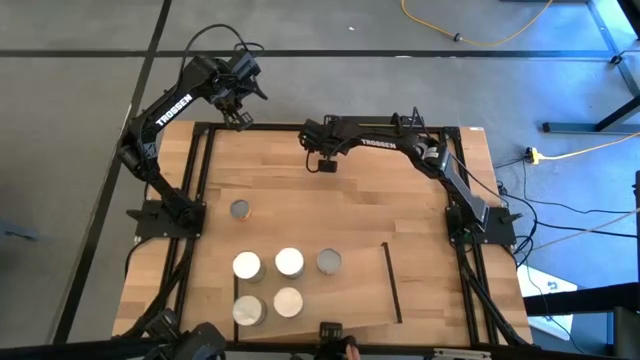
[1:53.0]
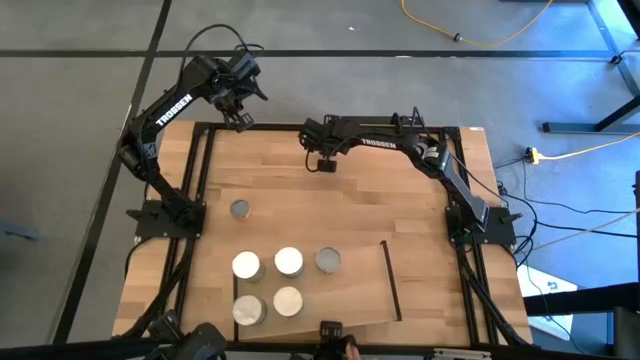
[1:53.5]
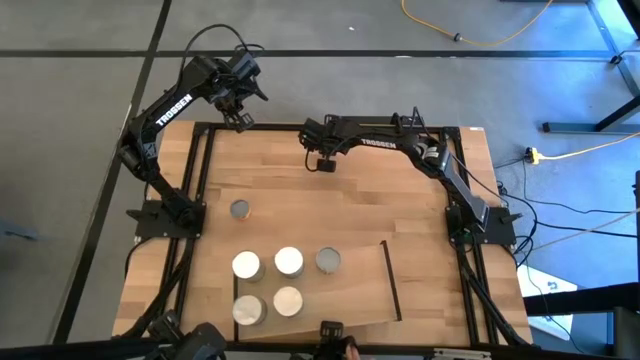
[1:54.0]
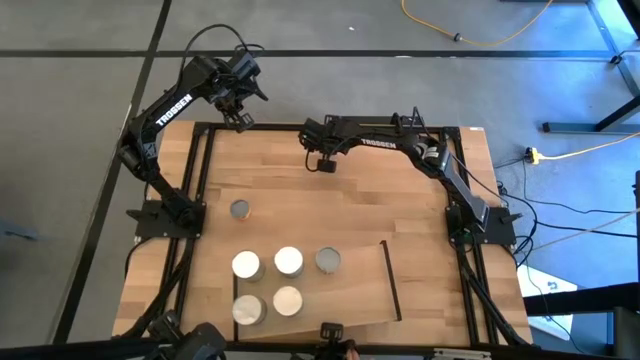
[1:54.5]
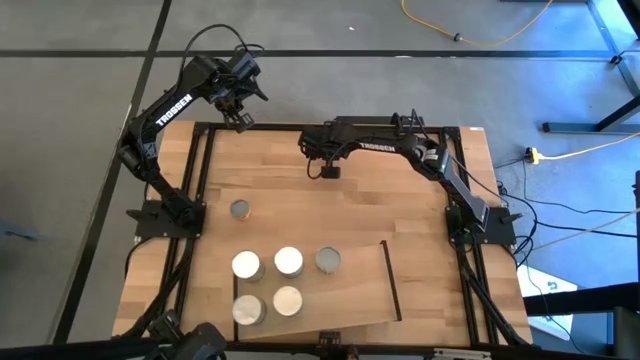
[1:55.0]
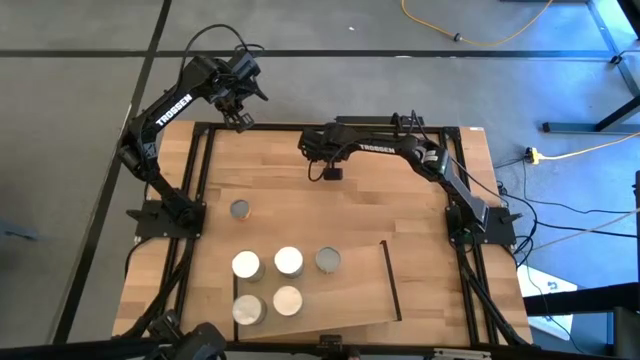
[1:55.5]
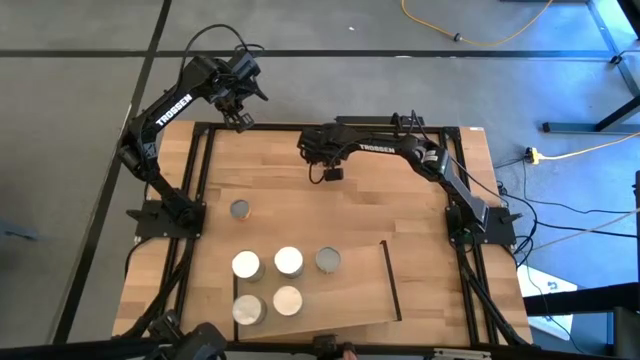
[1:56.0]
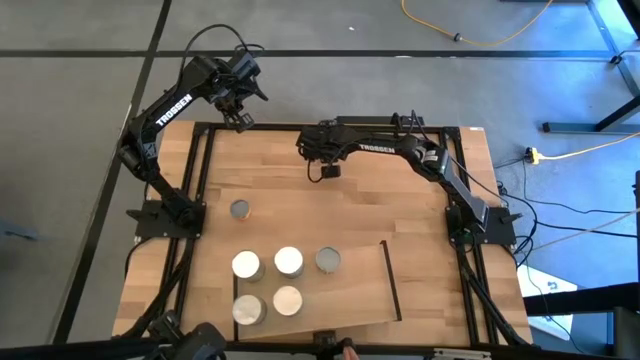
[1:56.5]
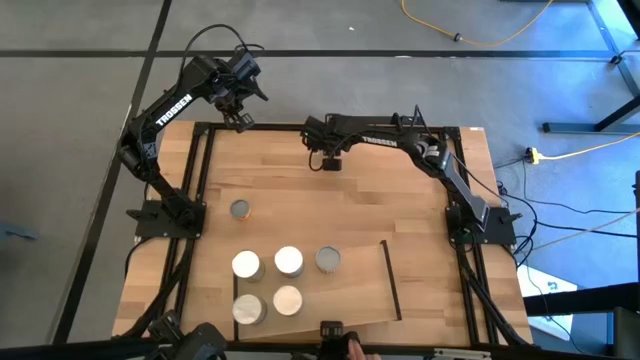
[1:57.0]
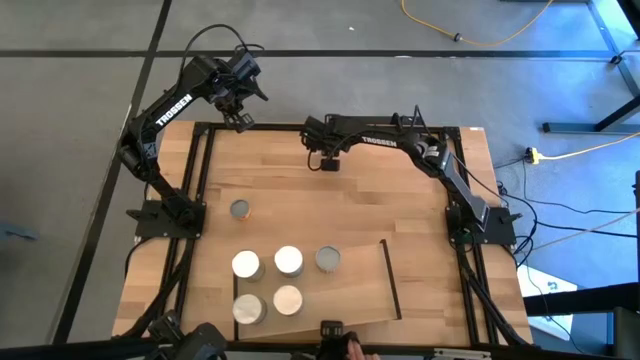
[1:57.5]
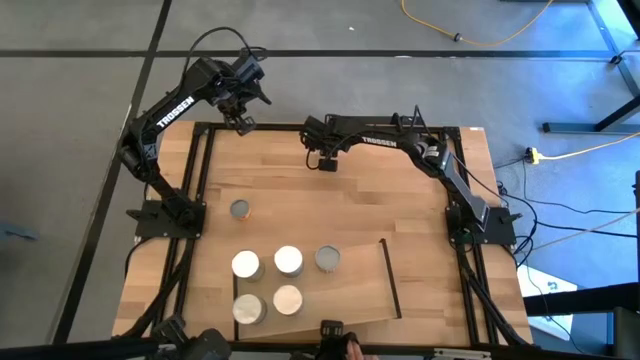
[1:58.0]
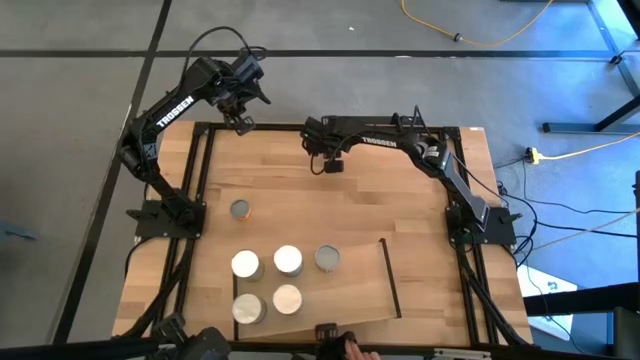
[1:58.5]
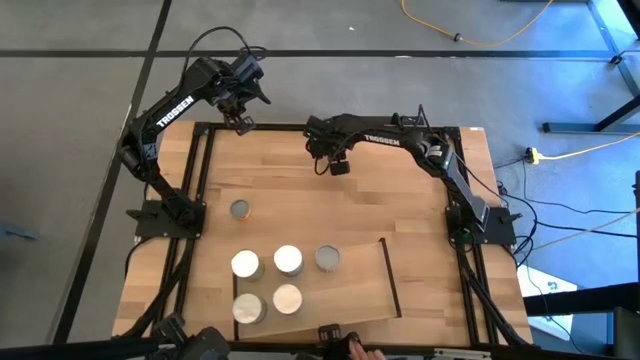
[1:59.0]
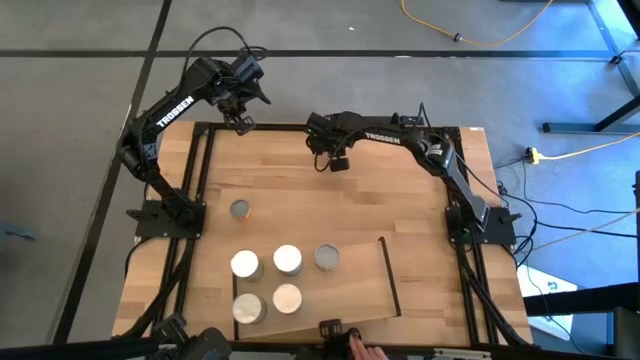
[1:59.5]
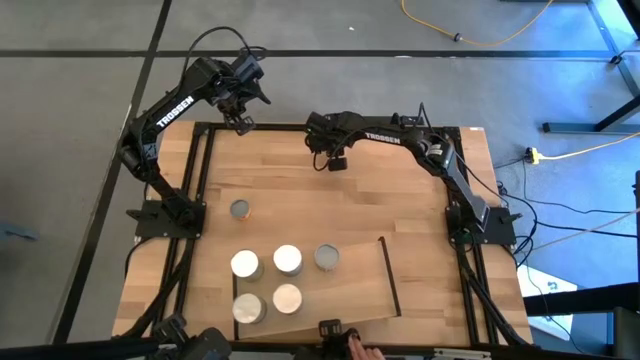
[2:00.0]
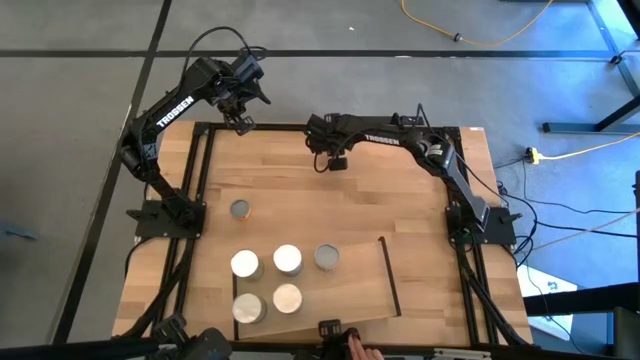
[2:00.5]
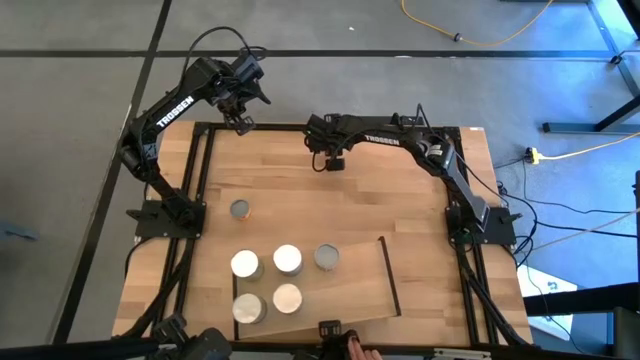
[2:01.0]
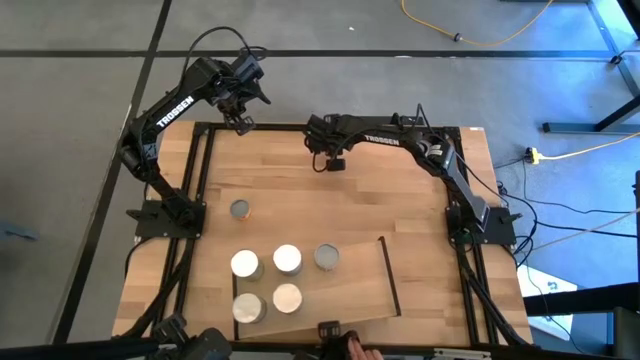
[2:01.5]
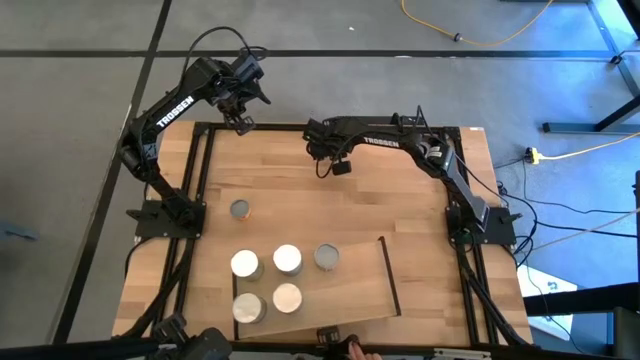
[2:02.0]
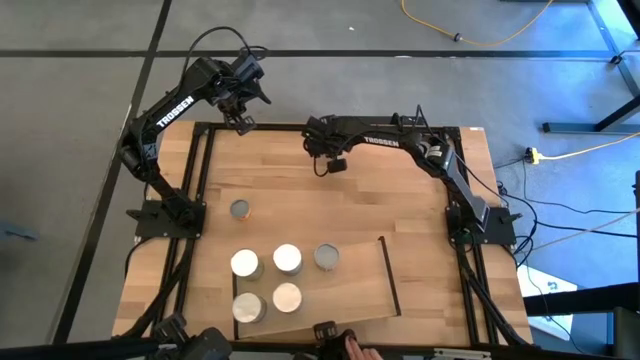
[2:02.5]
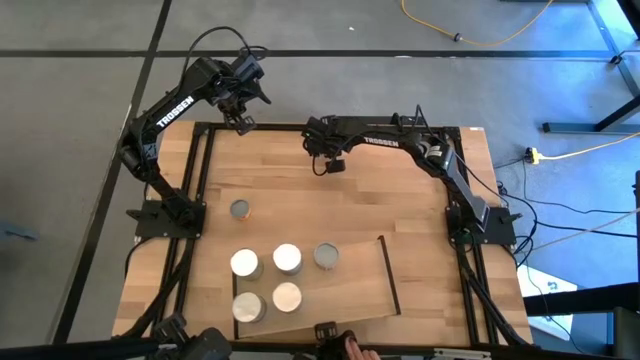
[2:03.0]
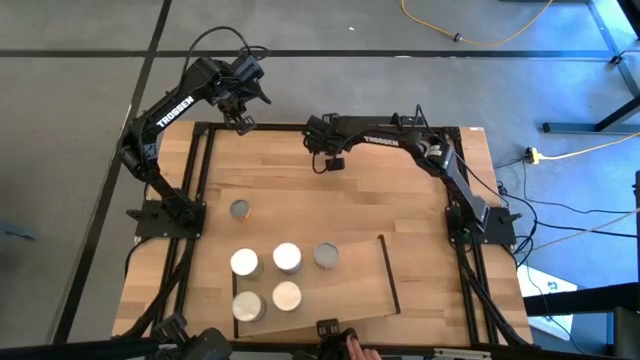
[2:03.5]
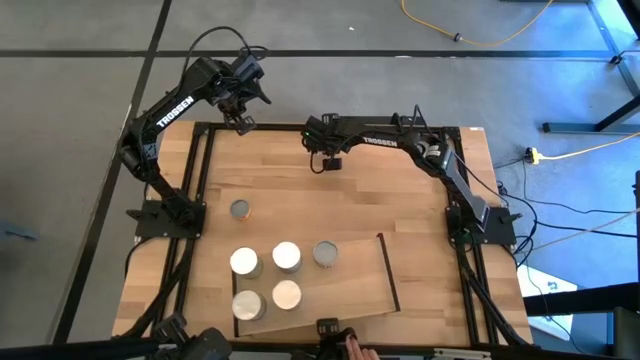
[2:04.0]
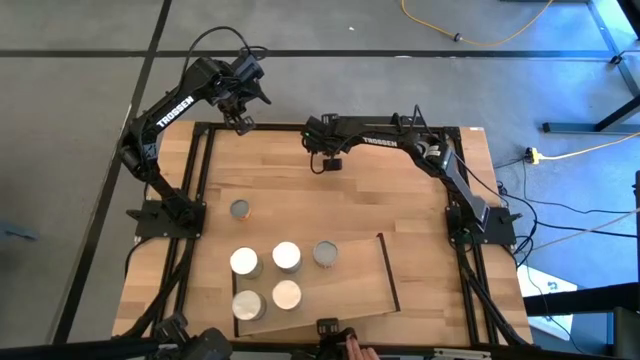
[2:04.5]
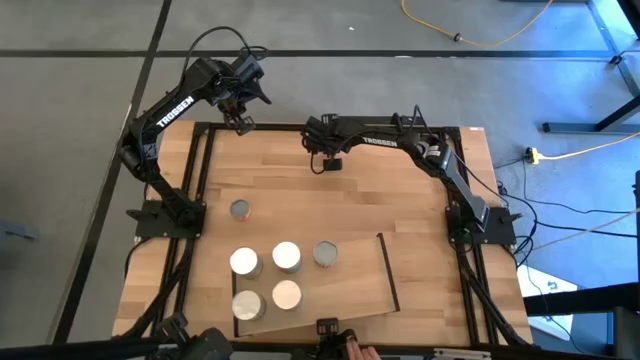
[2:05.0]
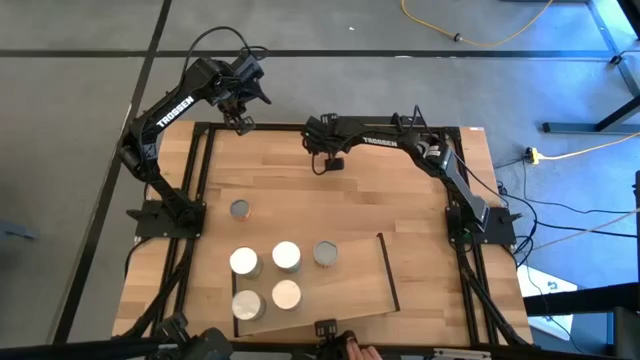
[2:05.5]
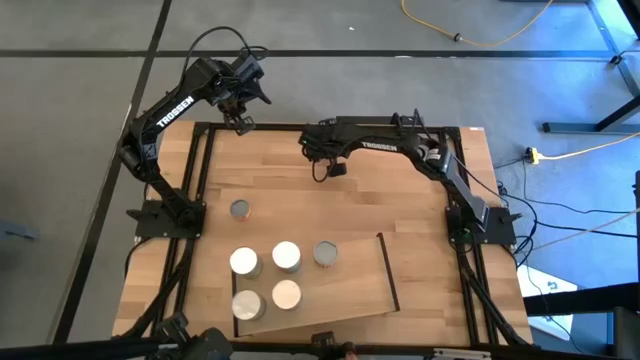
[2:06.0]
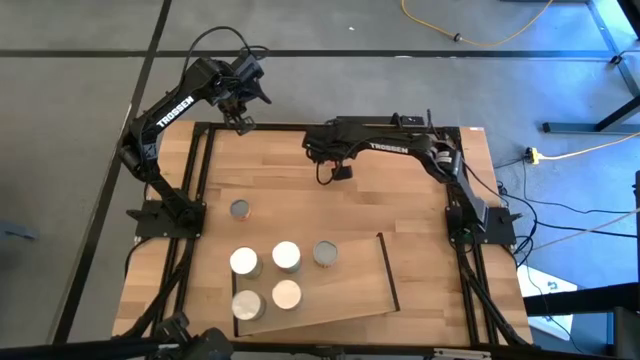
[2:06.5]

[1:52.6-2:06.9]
Task: Pick and place cans onto a shelf
Put the canned meat balls on the shelf

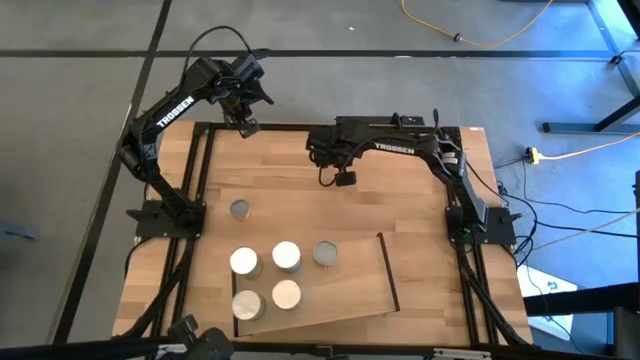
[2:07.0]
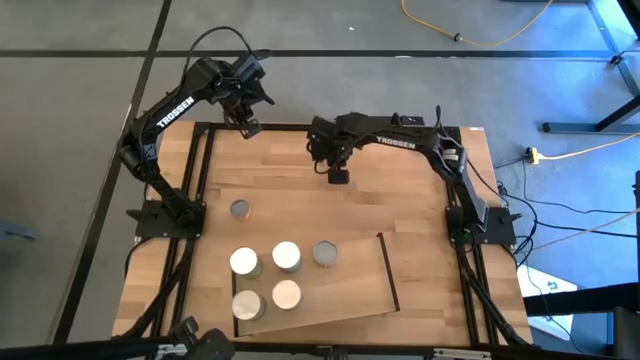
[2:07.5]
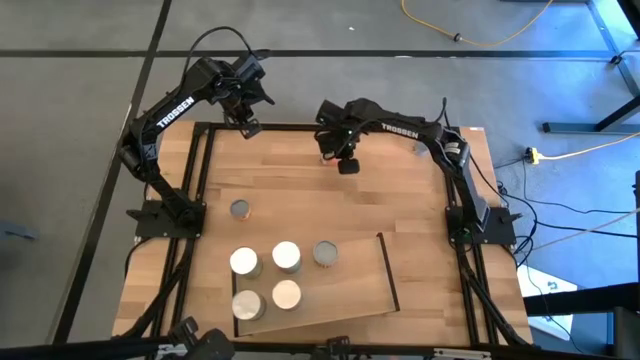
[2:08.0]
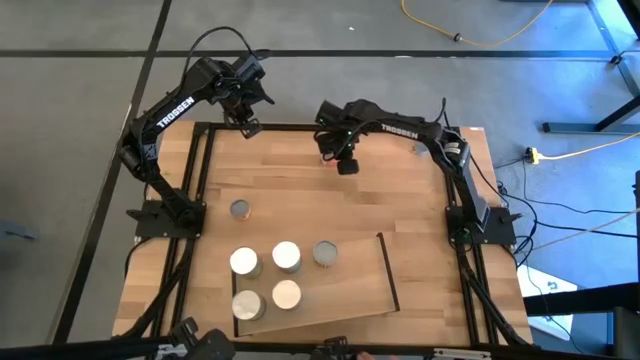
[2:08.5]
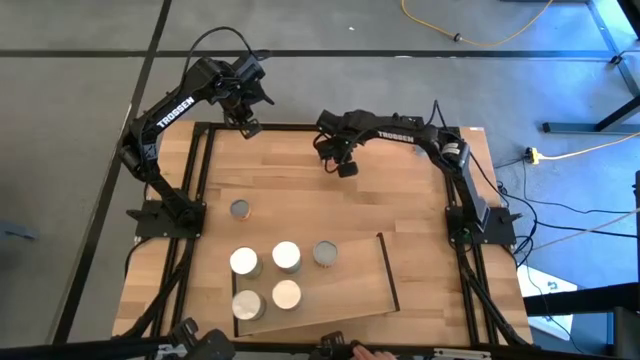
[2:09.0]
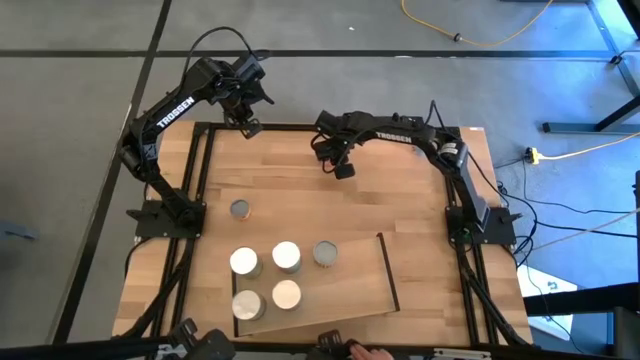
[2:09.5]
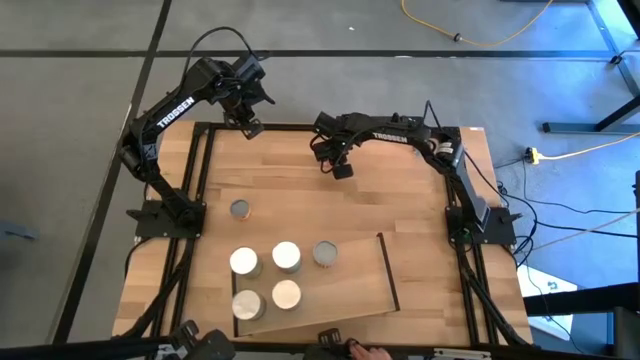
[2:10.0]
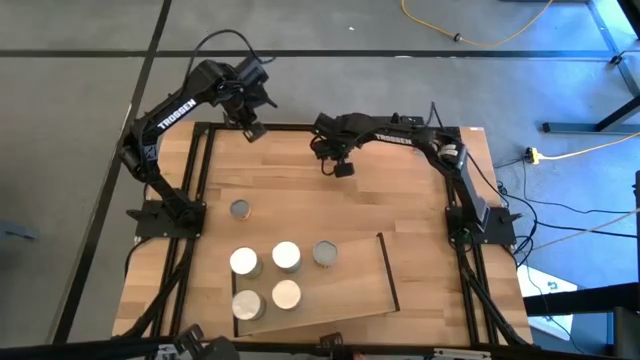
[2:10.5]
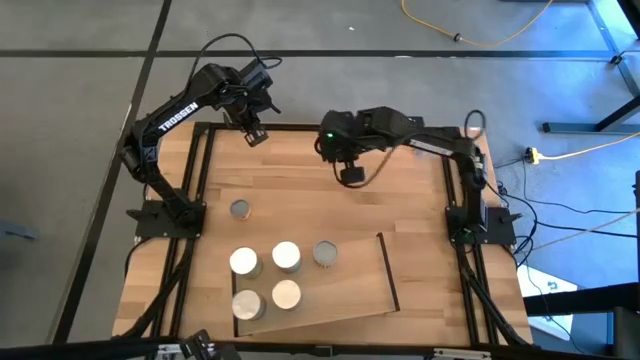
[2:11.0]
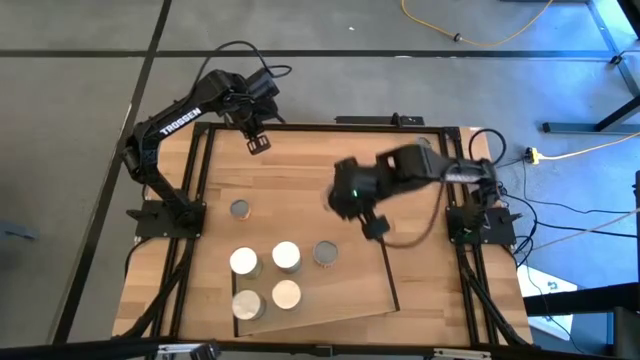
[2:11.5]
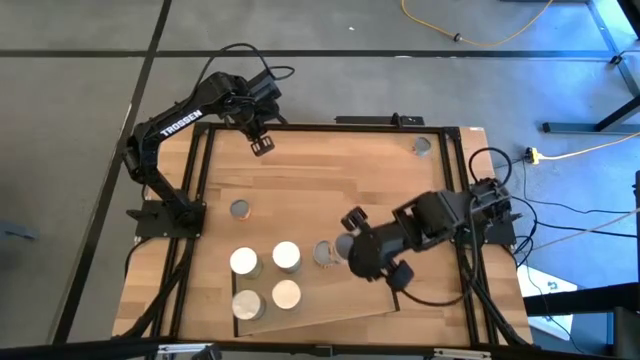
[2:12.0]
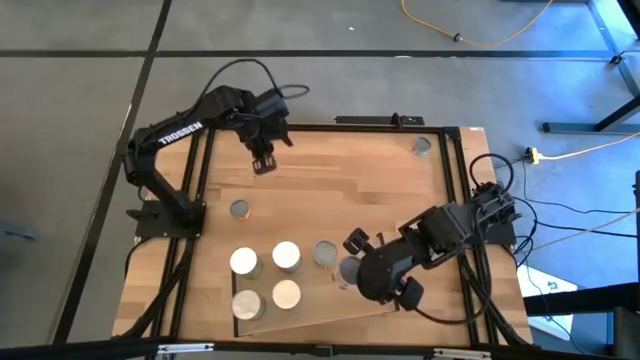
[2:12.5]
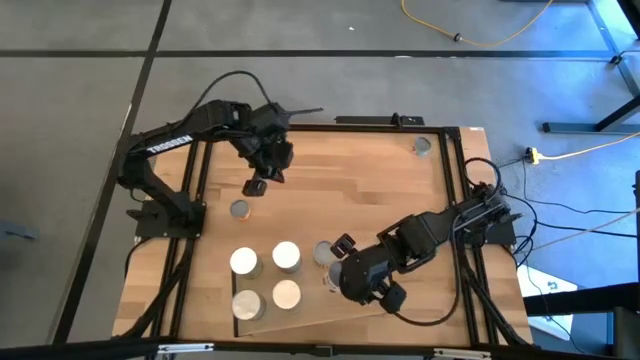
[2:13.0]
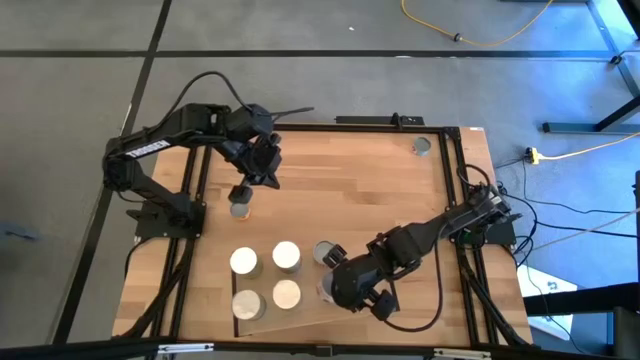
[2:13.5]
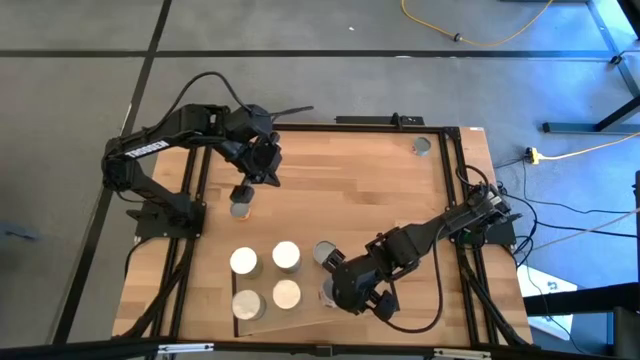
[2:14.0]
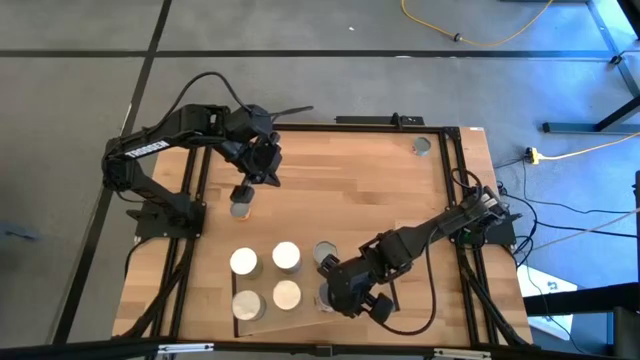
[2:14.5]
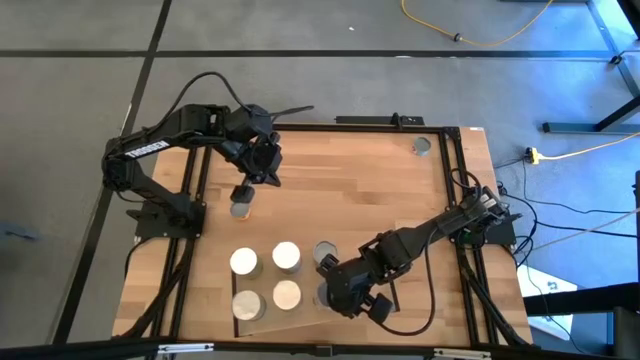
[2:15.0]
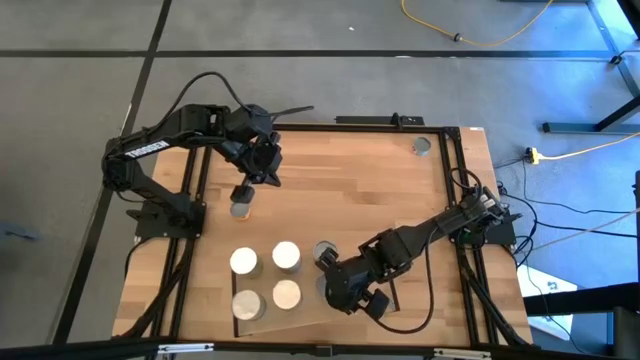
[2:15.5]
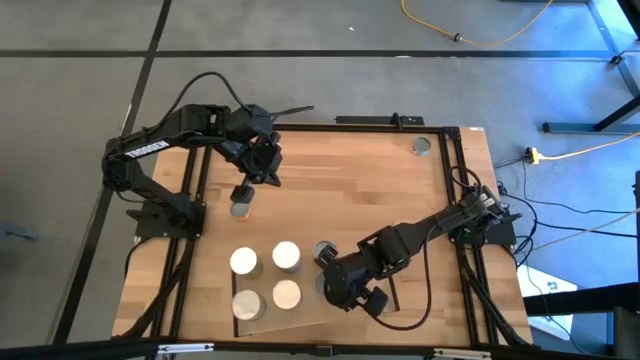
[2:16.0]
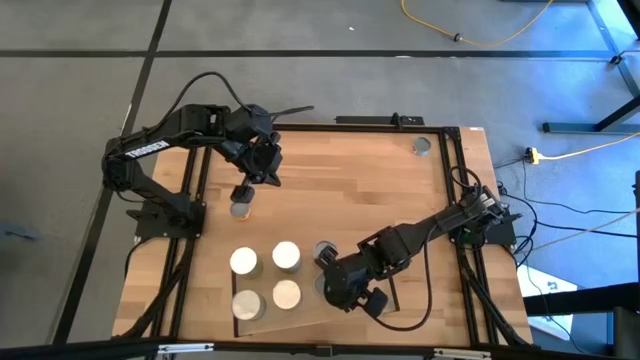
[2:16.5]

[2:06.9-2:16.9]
Put the canned meat balls on the shelf
